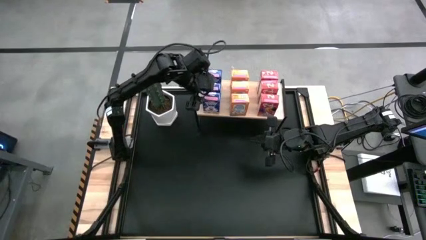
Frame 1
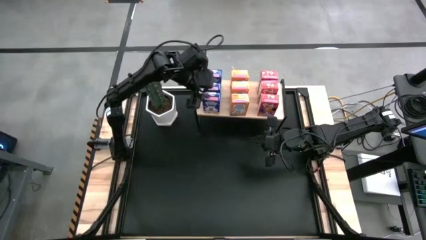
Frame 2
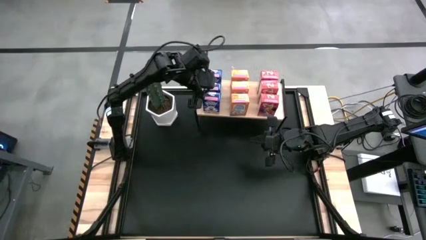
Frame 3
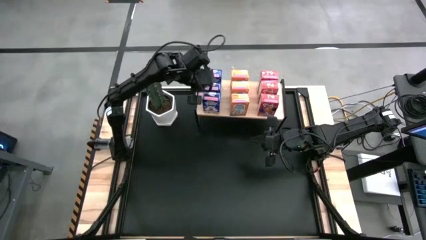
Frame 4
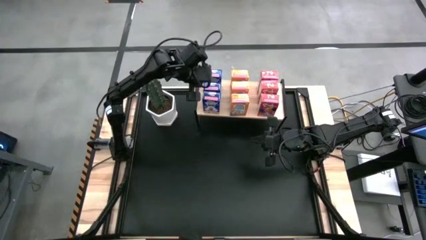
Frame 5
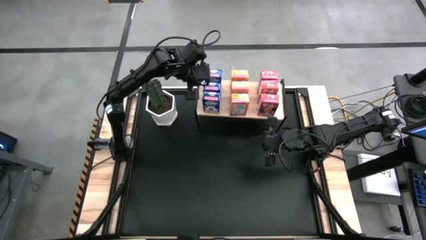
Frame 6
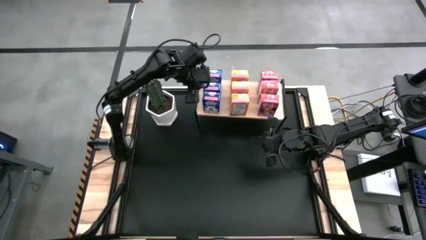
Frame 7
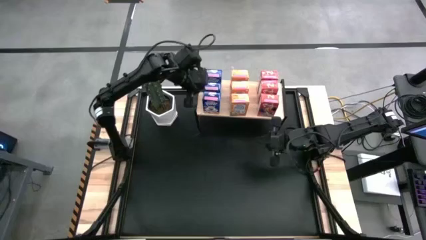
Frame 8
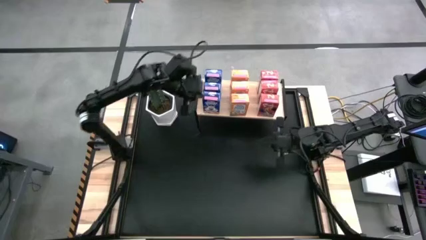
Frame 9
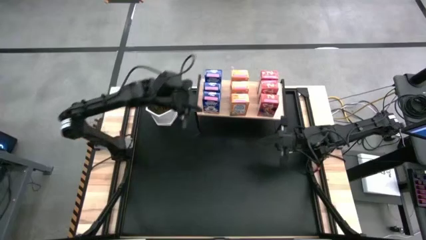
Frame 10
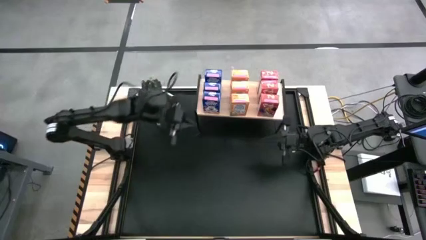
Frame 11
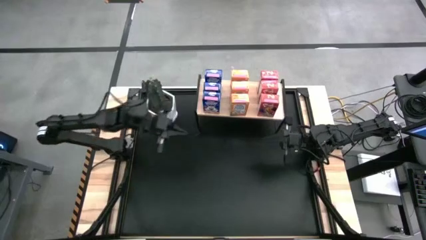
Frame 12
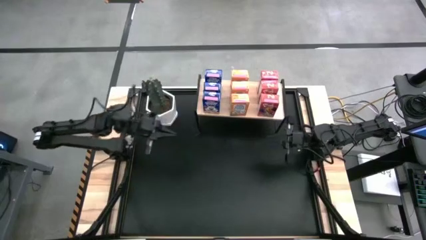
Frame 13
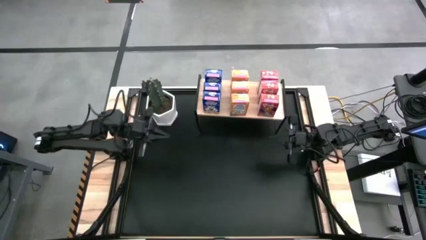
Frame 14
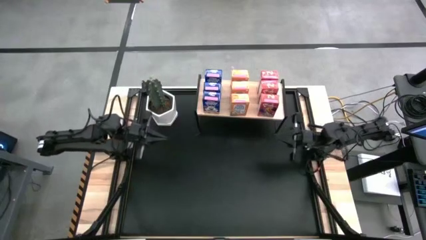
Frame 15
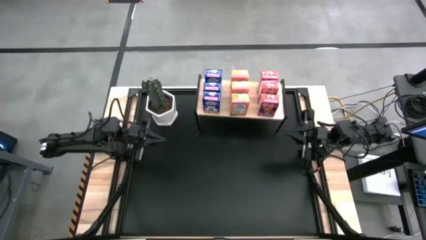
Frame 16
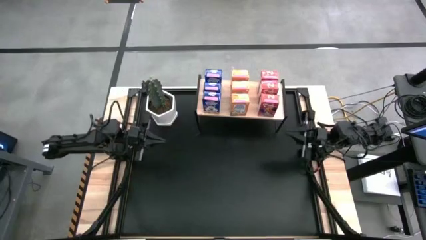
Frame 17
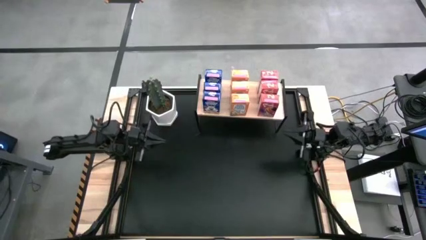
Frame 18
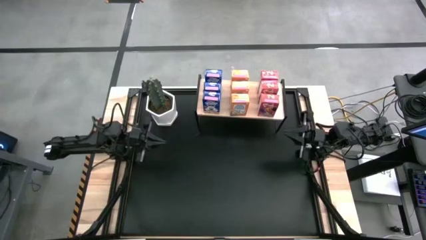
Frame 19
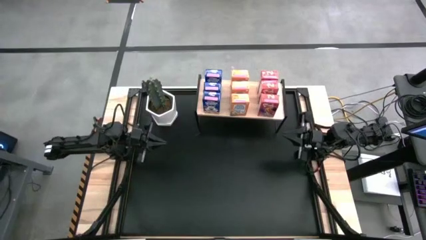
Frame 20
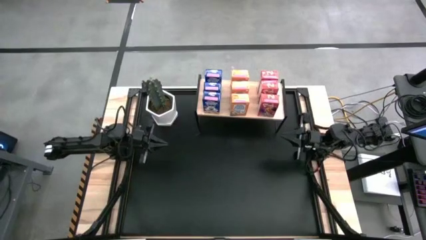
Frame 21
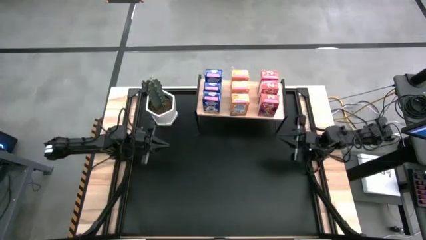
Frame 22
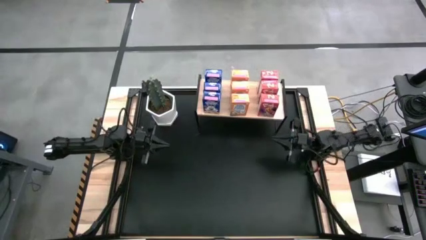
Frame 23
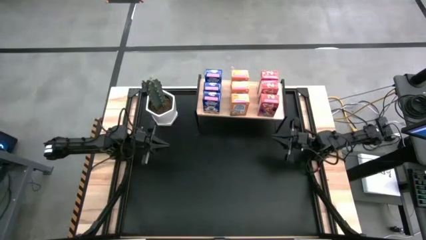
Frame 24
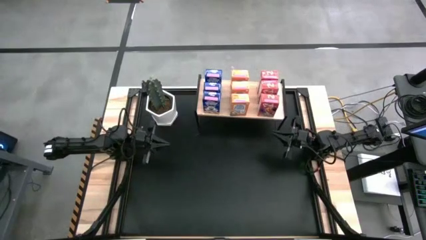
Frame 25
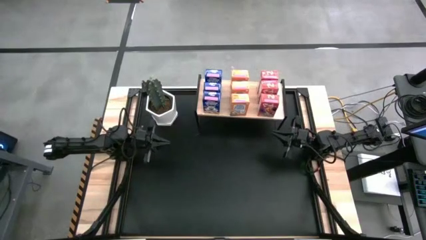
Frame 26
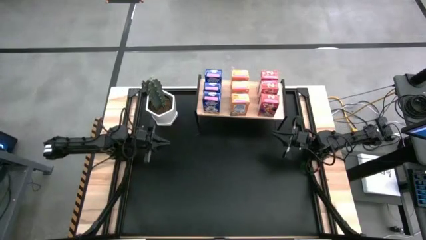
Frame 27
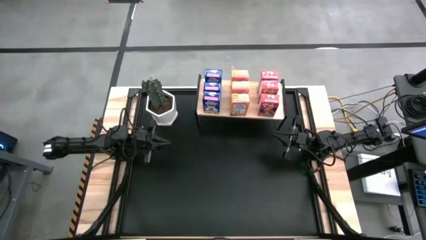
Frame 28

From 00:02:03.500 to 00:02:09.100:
Task: Stack cereal on shelf
Return to Home Position

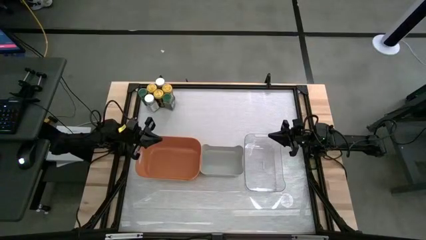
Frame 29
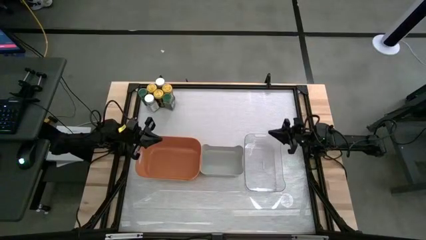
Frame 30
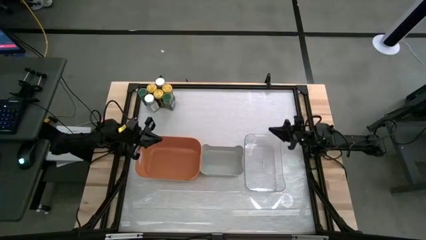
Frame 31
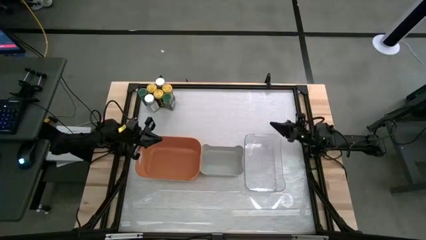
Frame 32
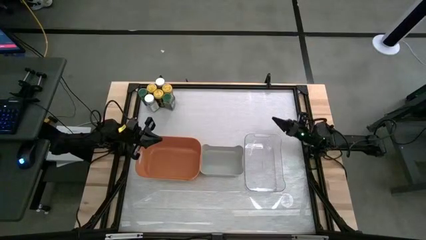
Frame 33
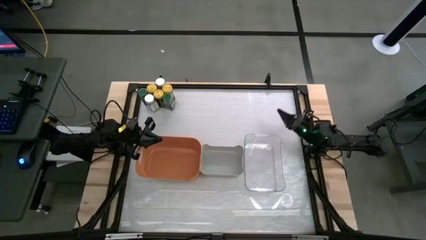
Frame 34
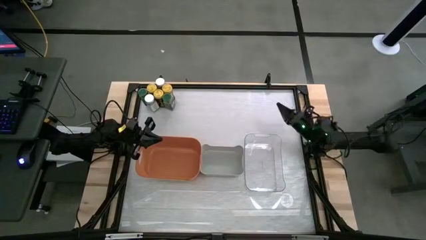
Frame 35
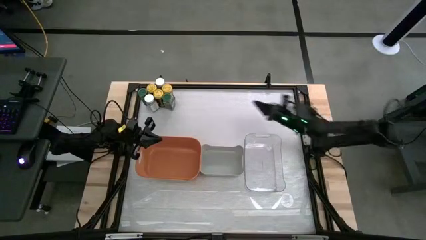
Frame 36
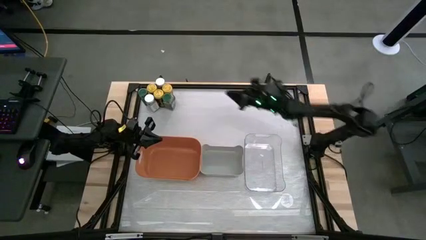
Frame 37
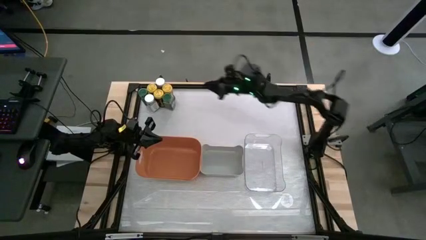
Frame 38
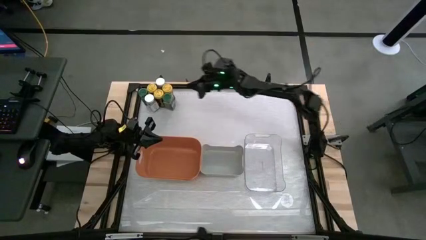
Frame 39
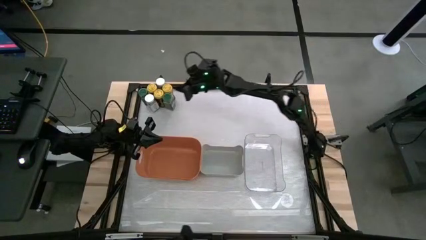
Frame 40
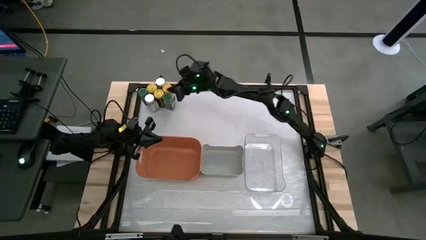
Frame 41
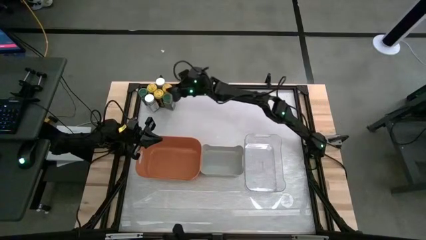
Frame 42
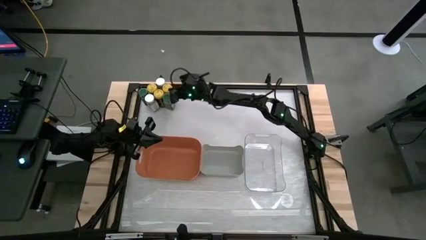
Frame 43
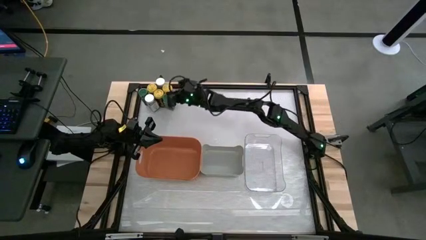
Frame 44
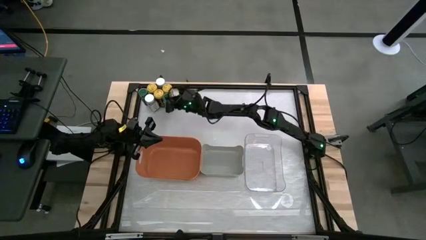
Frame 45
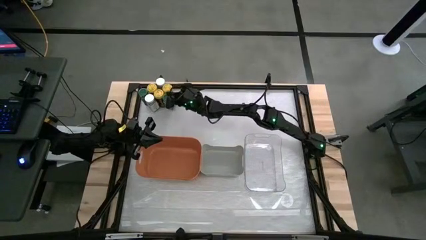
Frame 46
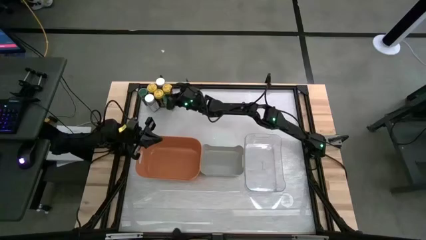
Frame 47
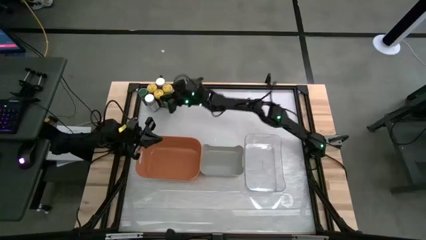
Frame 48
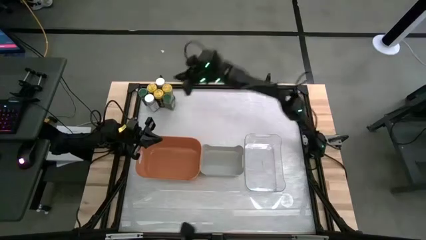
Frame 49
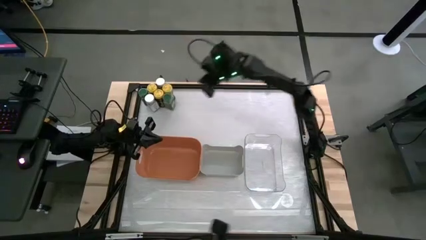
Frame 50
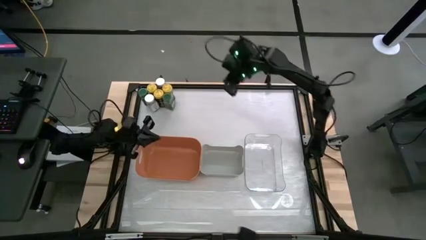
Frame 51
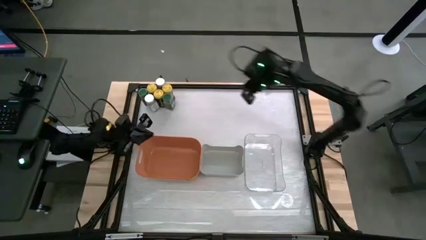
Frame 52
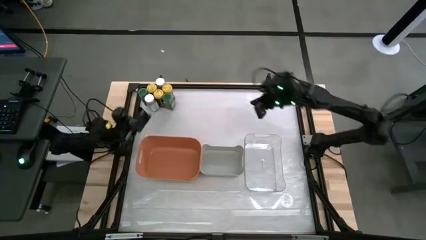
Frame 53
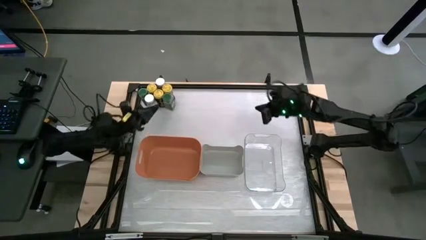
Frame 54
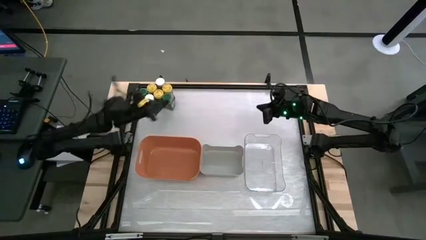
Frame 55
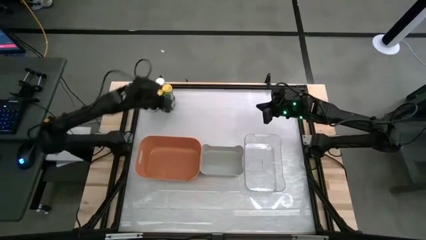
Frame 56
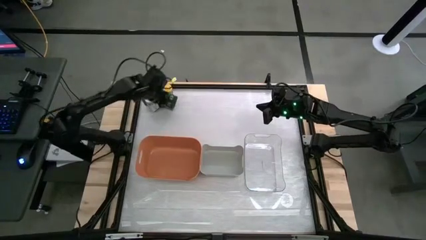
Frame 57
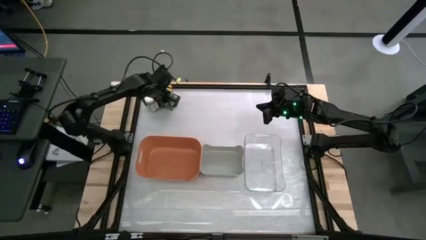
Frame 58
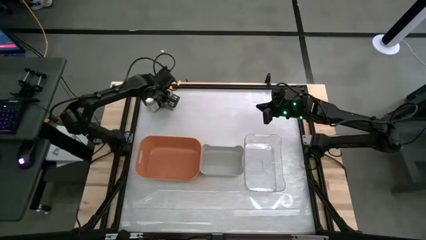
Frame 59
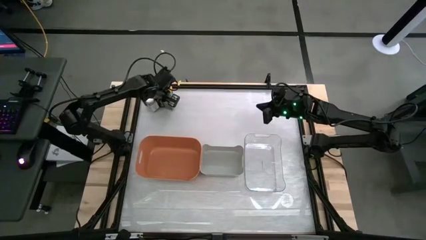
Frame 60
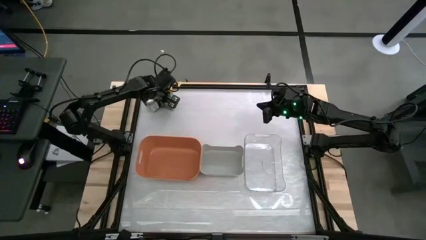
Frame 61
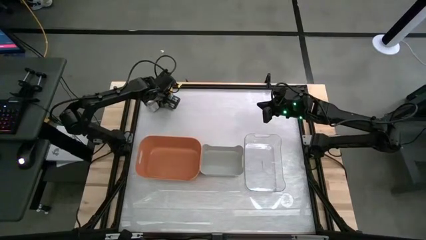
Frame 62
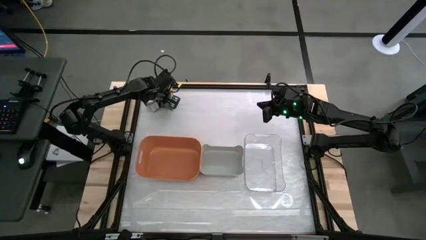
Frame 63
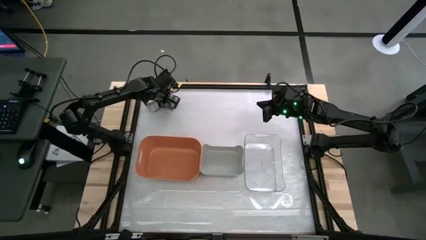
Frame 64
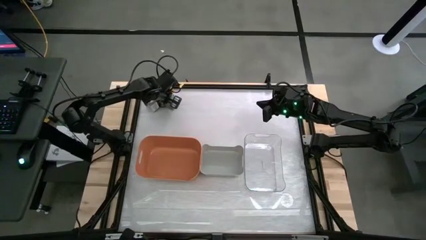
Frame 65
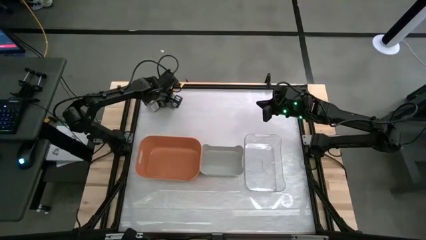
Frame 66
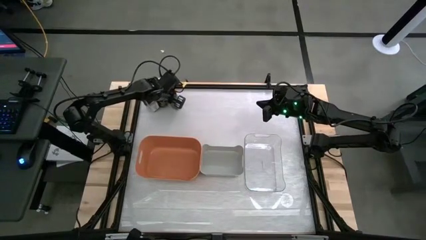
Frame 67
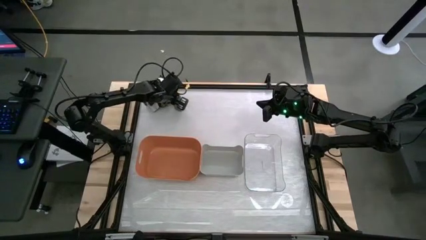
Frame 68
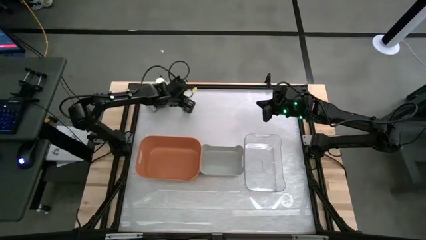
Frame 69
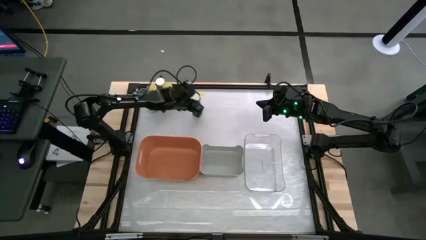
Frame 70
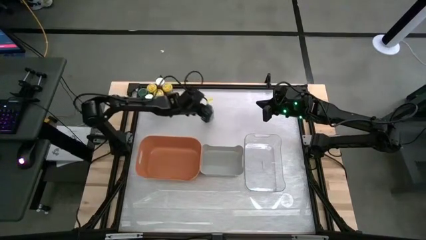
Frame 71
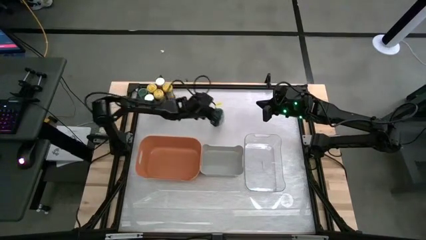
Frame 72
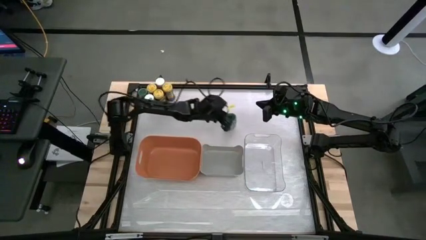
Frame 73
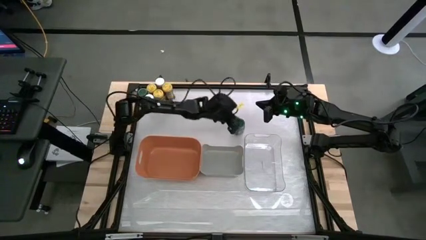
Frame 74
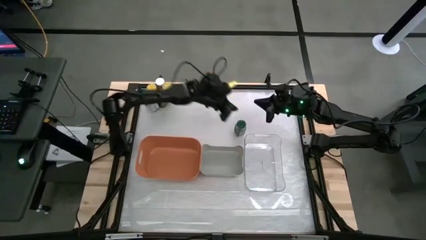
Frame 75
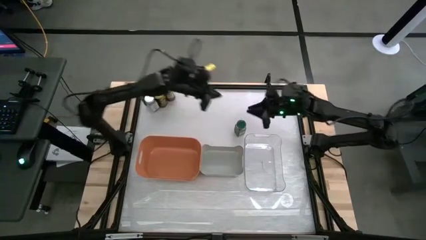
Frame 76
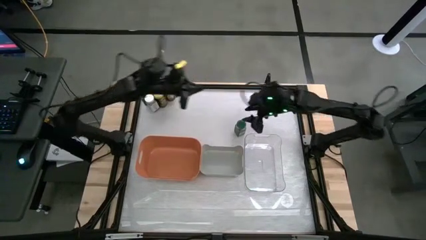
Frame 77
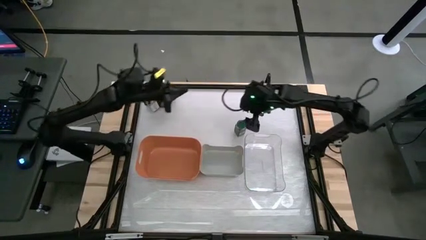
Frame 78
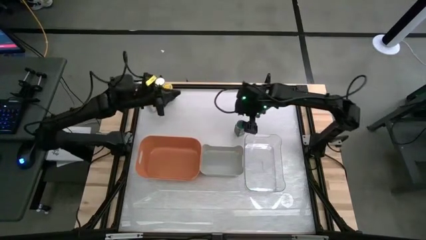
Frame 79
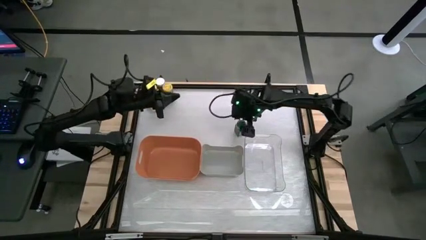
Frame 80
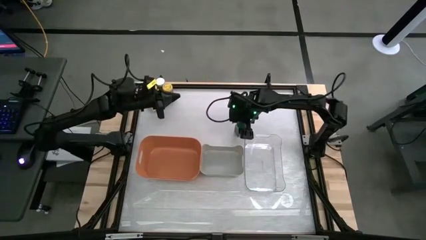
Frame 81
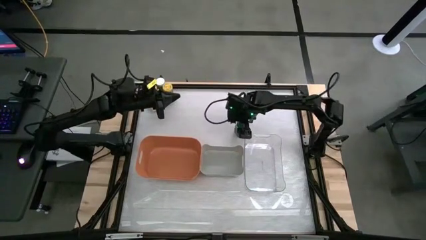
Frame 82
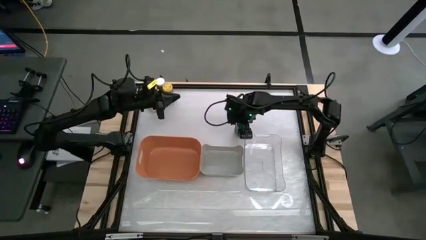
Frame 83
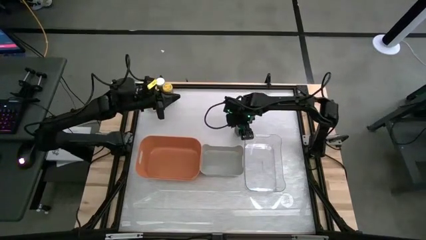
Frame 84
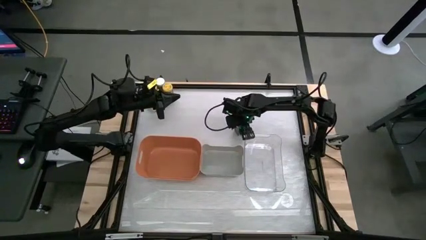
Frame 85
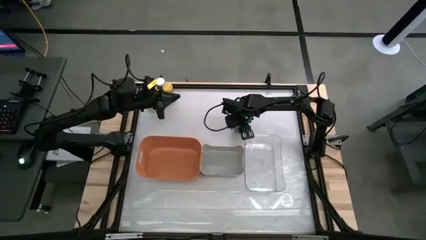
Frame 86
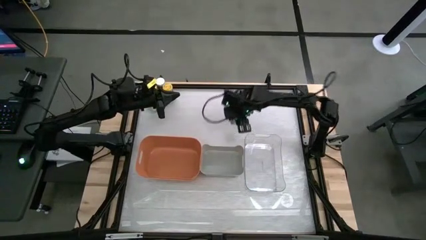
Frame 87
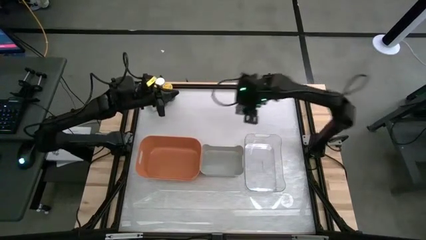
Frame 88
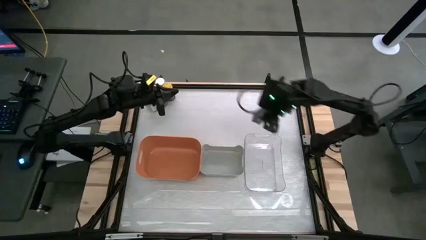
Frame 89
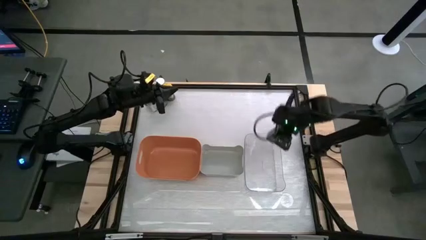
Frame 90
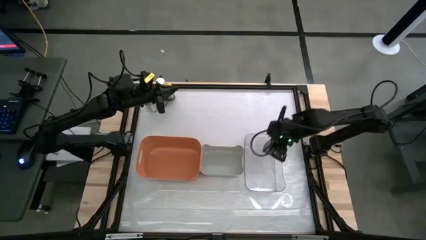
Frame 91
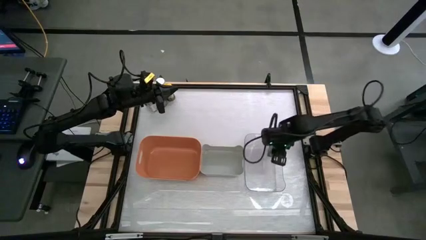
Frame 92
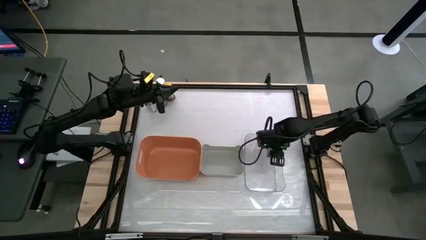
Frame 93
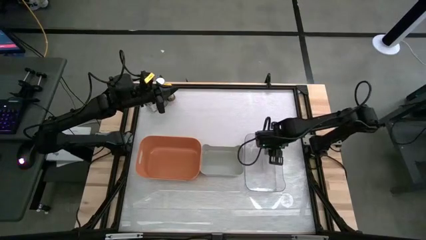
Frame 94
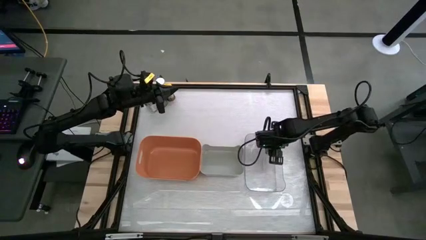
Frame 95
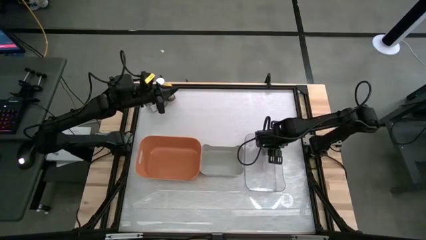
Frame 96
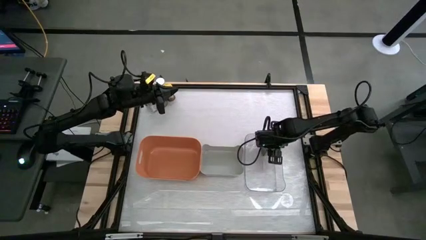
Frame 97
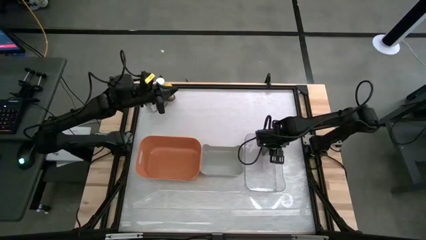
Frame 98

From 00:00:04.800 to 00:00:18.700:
Task: Sort spices by type
Put the right green seasoning bottle into the transparent bin
